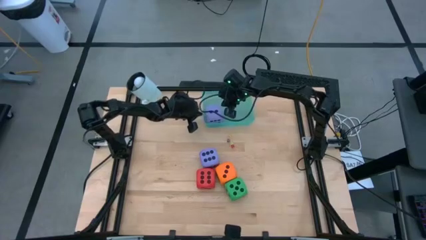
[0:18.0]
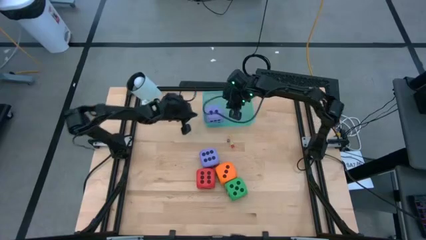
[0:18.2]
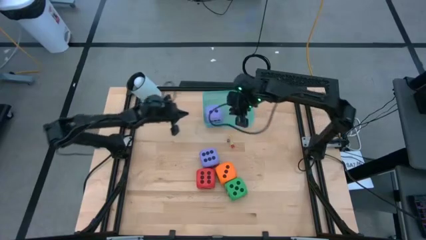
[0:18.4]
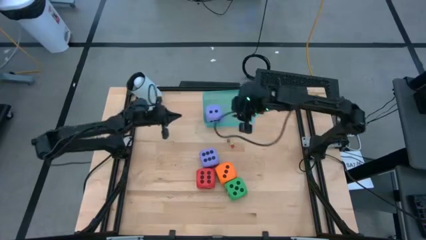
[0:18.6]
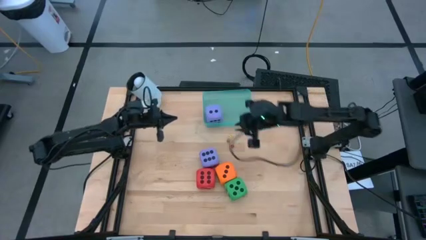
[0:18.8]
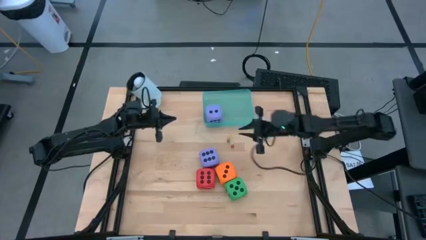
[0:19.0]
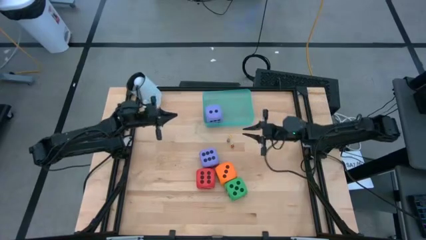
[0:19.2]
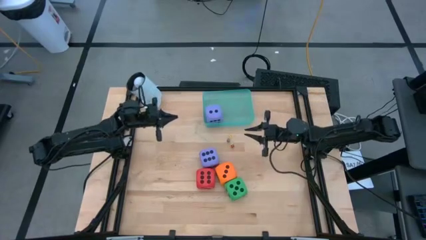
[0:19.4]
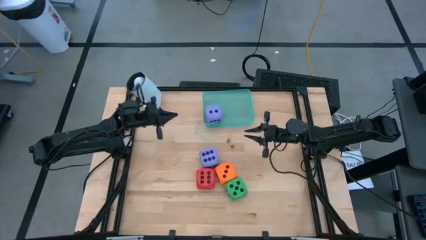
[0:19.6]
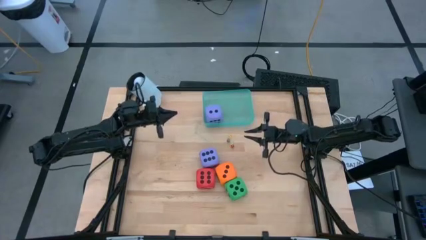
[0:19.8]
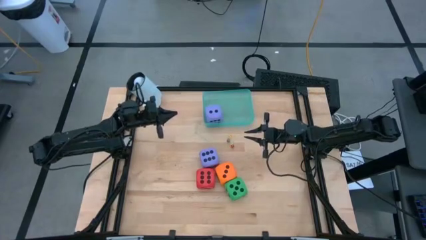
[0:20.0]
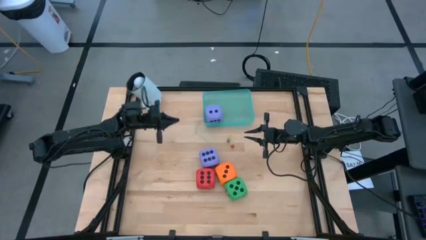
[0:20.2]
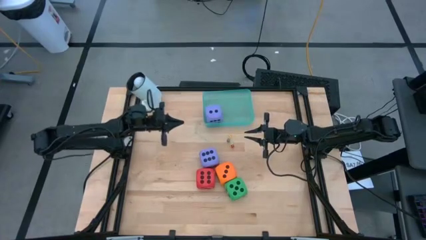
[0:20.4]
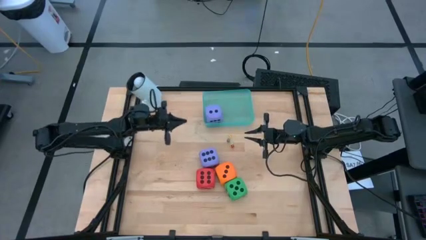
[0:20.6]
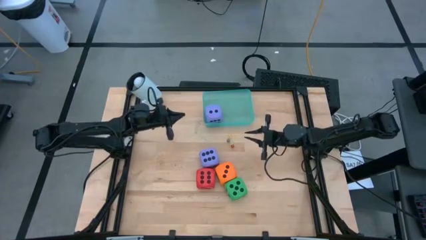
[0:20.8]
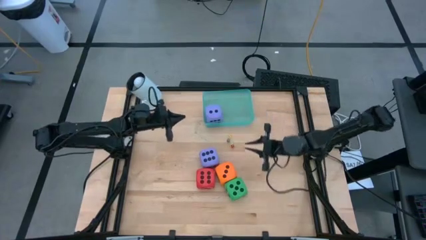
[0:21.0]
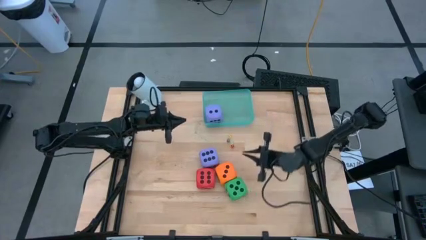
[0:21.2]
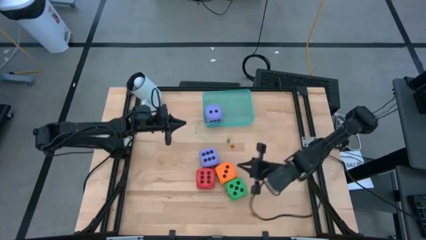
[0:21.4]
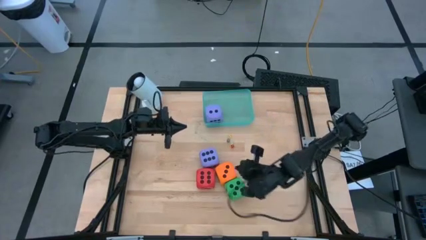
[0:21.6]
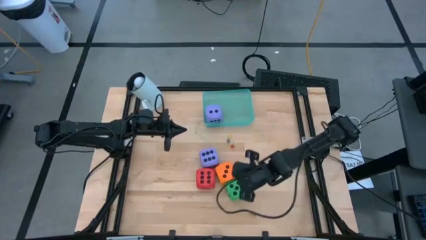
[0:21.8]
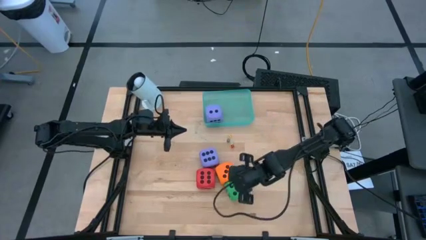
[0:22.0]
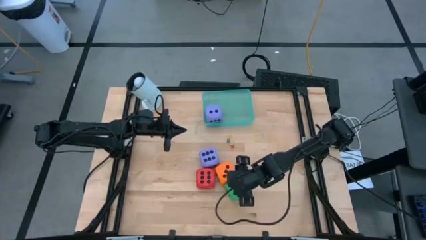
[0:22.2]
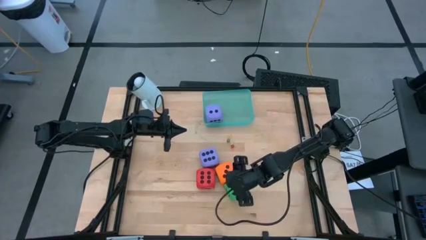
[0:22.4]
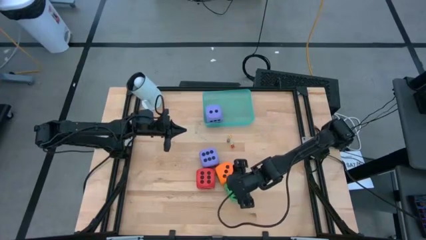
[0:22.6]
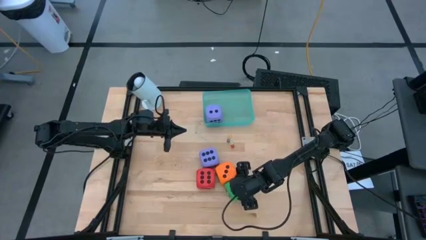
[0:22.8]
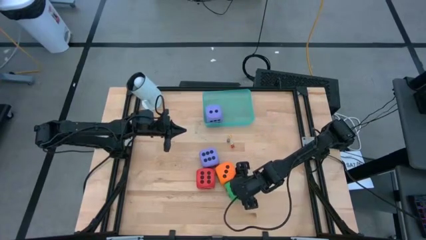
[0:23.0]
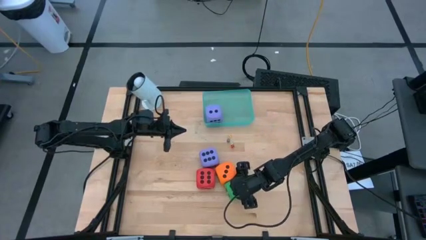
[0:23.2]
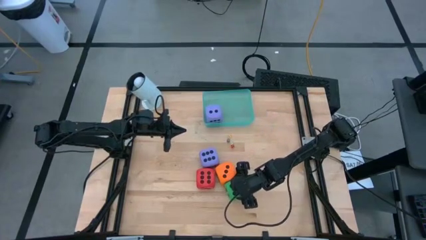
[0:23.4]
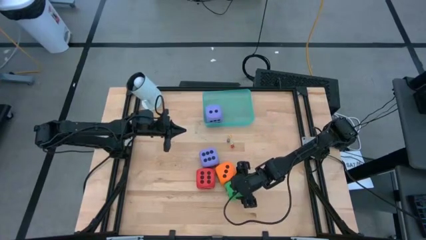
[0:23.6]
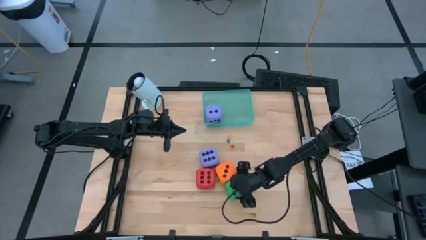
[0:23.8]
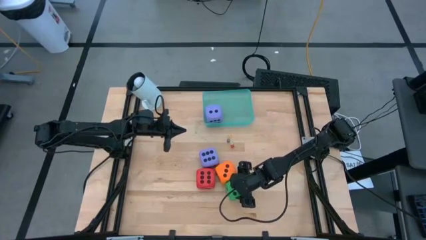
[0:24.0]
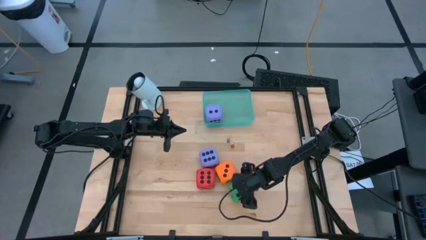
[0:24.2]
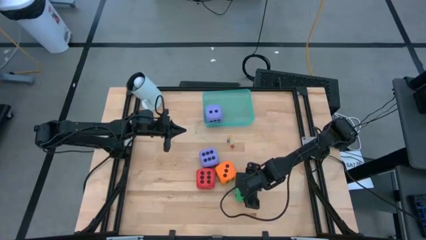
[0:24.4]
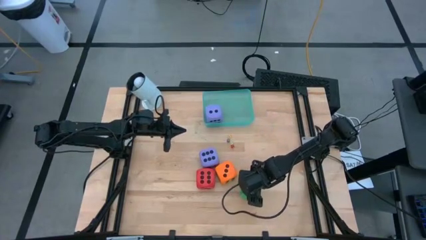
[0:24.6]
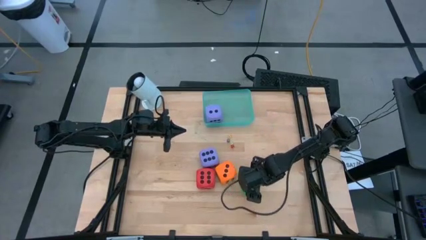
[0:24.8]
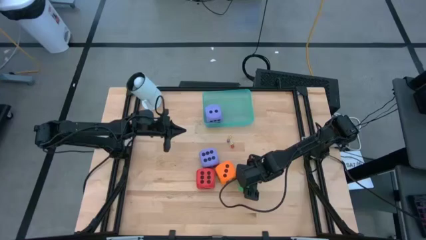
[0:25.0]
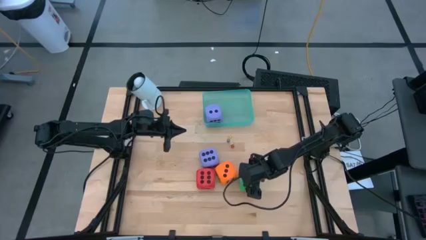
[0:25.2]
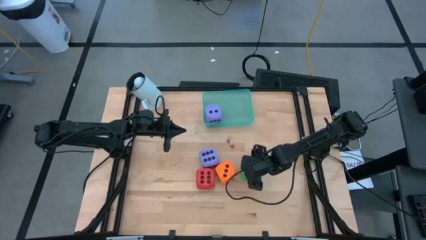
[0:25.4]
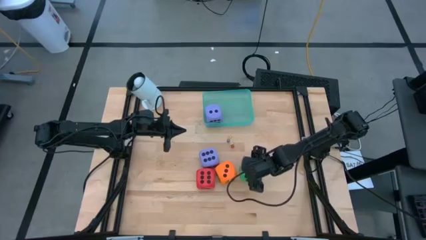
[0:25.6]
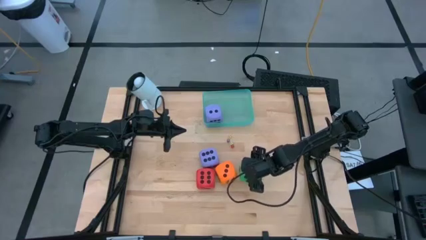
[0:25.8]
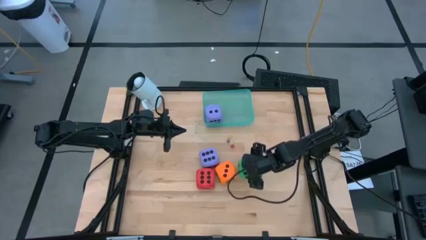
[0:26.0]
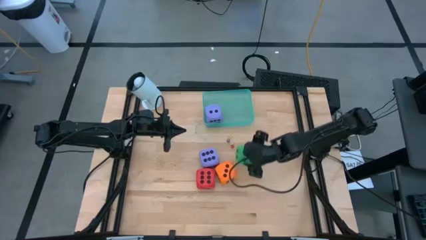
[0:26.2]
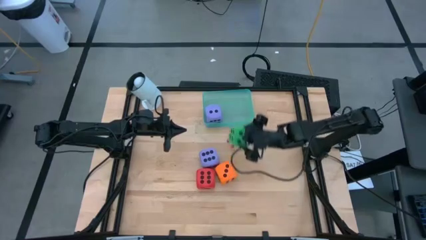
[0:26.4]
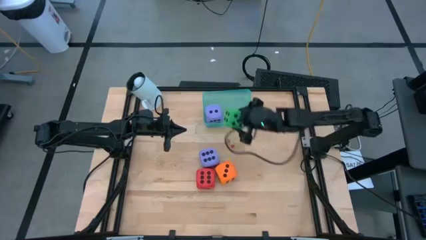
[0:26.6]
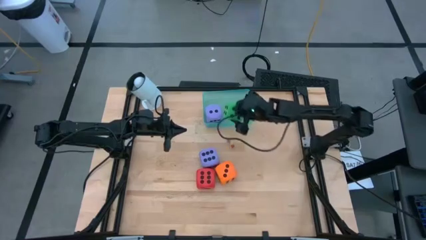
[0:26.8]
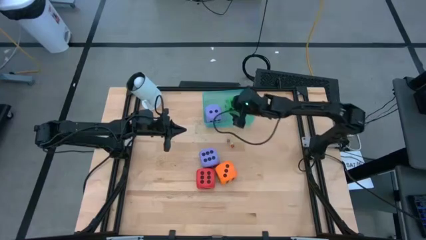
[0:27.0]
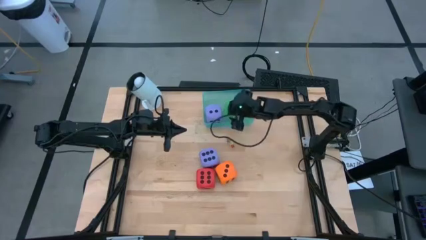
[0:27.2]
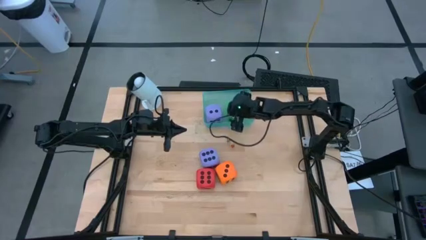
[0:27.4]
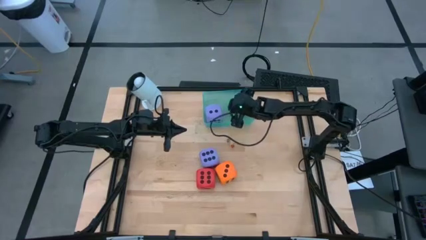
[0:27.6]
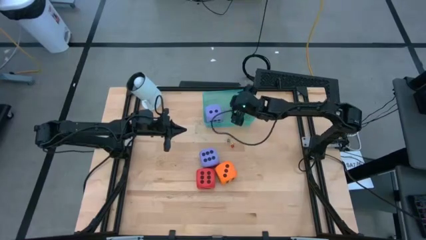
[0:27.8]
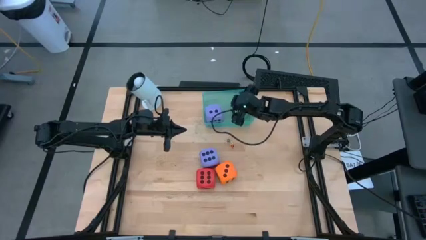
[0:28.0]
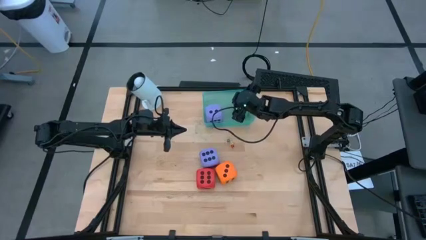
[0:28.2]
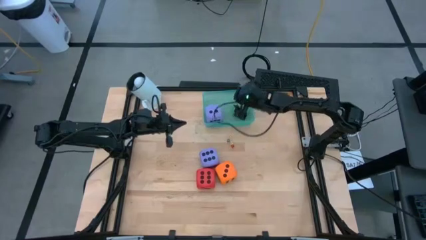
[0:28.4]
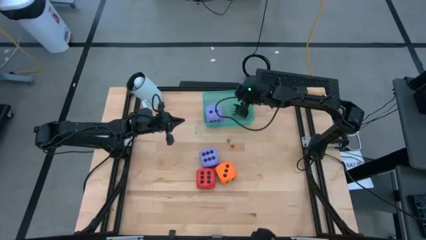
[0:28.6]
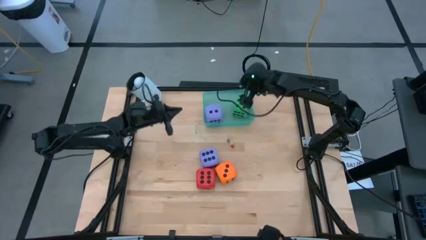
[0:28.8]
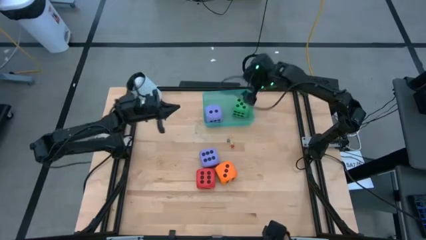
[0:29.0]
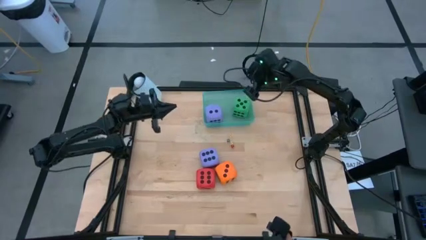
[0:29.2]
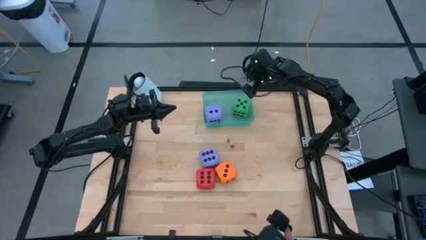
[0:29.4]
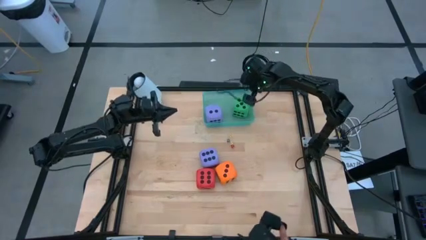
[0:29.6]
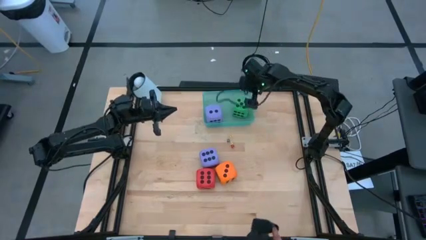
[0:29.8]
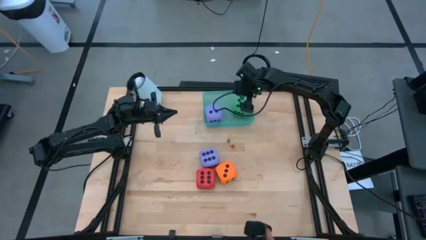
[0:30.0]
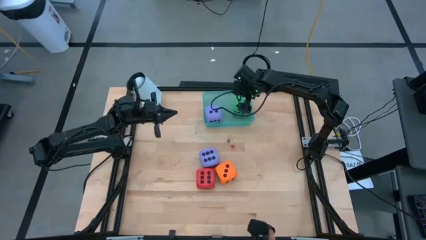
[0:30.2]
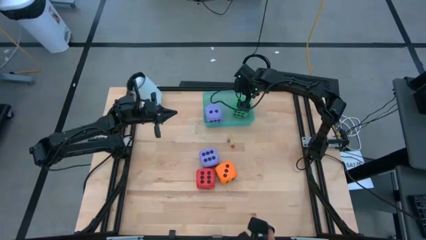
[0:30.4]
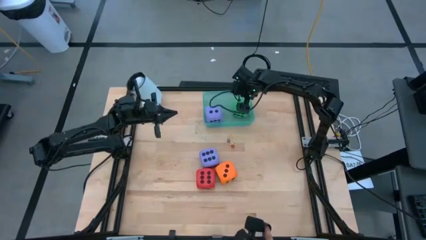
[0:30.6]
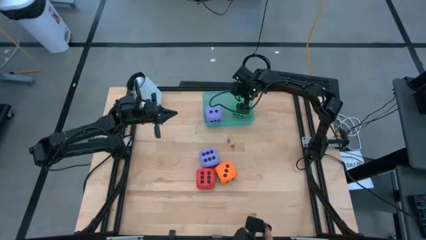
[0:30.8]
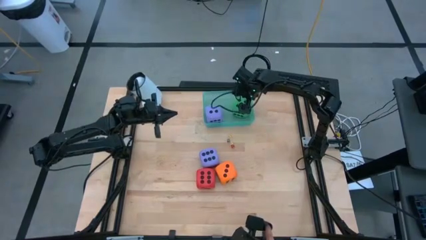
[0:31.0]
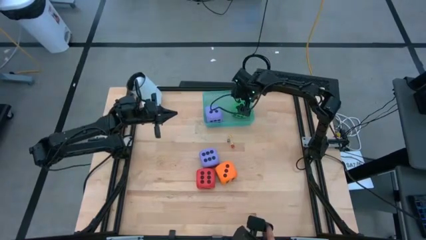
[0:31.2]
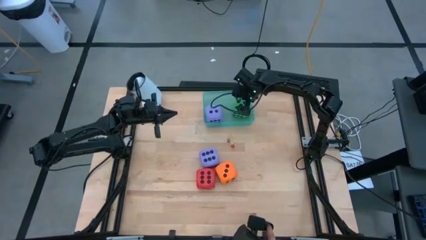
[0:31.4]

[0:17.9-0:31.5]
Task: Pick & Place Dice
Put the large green dice into the green container
